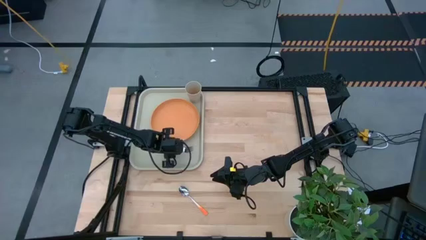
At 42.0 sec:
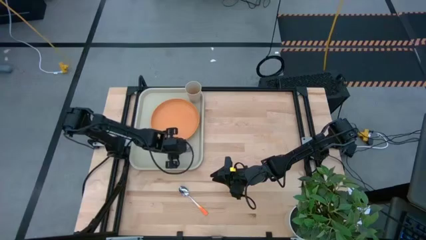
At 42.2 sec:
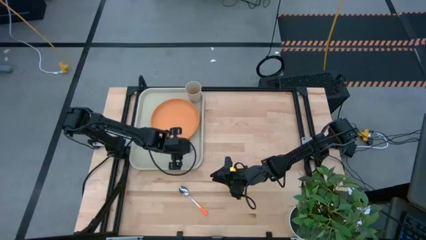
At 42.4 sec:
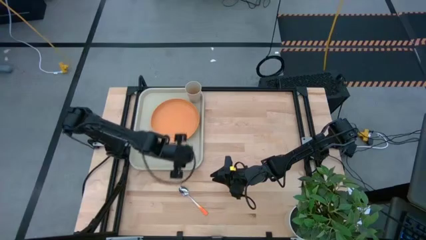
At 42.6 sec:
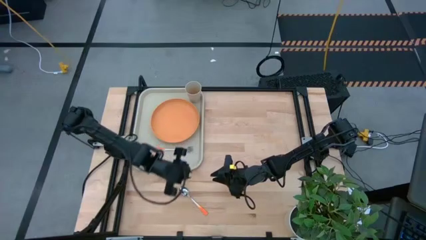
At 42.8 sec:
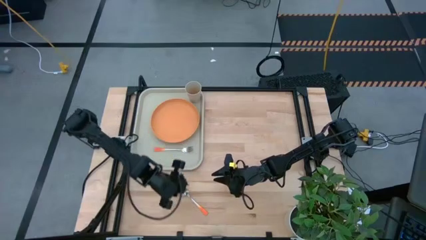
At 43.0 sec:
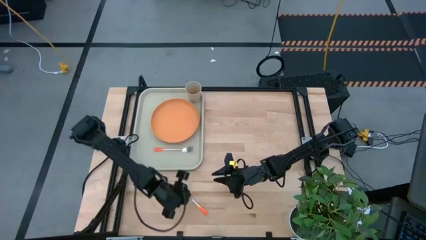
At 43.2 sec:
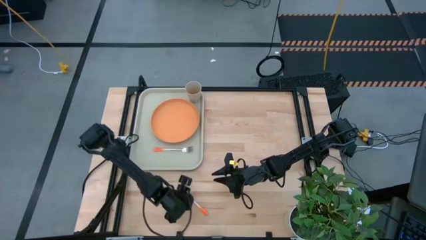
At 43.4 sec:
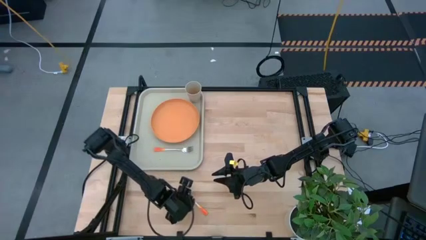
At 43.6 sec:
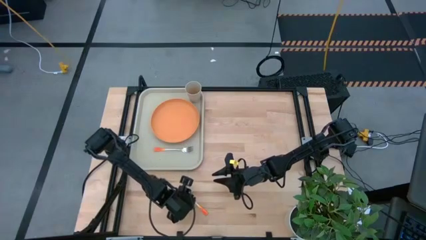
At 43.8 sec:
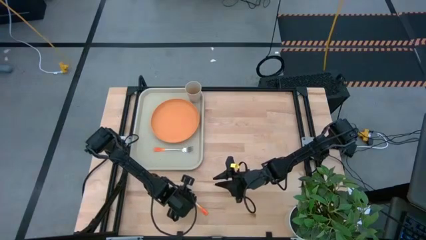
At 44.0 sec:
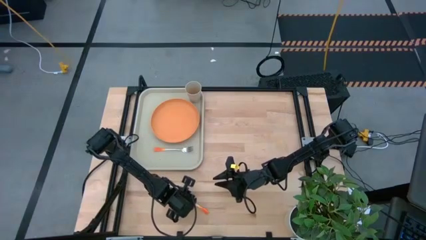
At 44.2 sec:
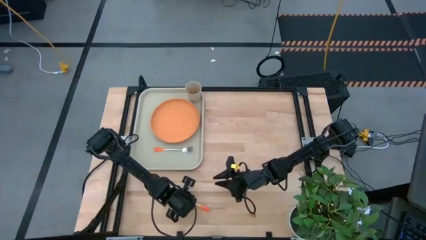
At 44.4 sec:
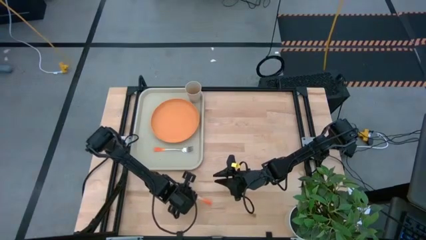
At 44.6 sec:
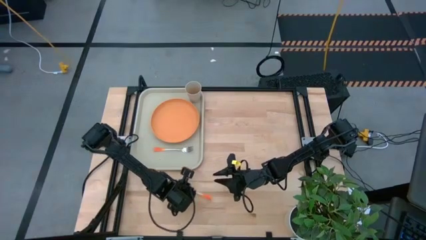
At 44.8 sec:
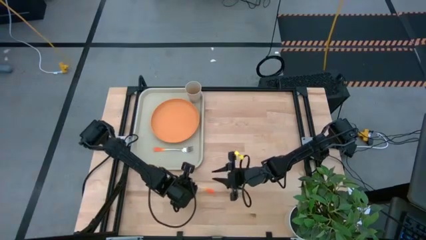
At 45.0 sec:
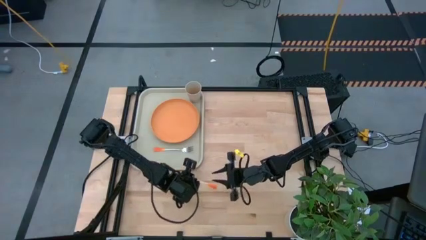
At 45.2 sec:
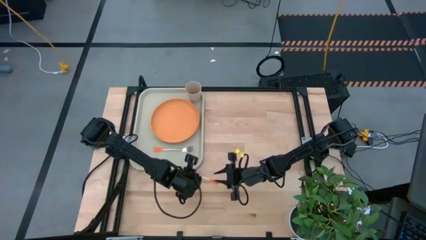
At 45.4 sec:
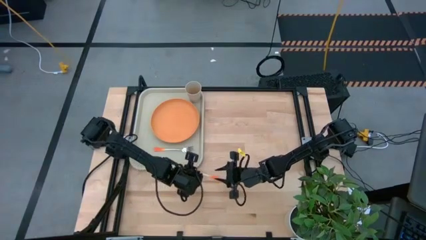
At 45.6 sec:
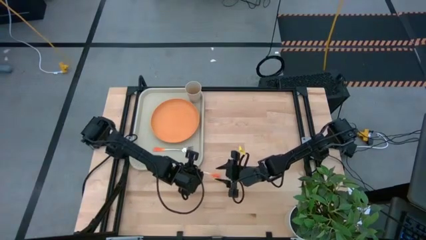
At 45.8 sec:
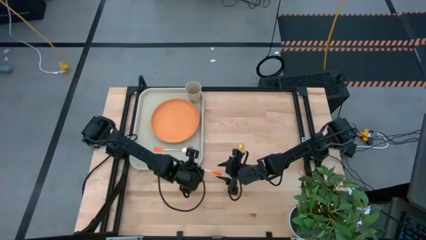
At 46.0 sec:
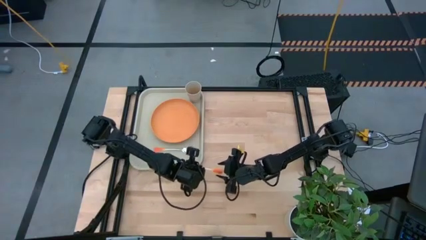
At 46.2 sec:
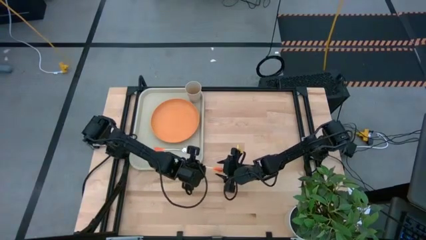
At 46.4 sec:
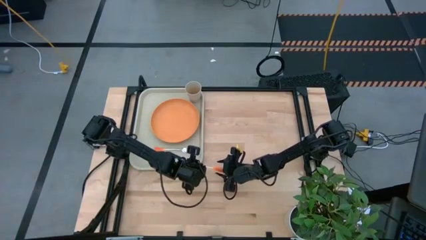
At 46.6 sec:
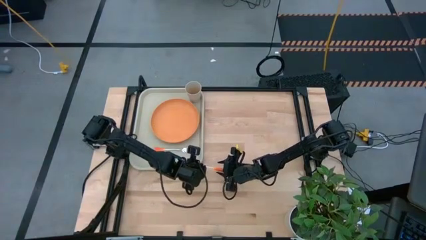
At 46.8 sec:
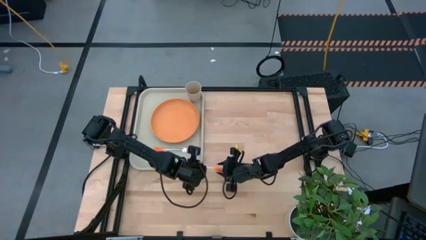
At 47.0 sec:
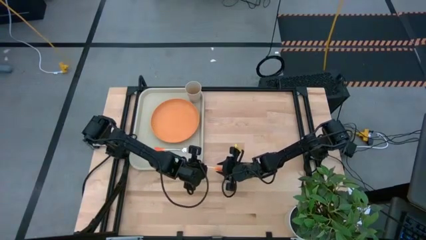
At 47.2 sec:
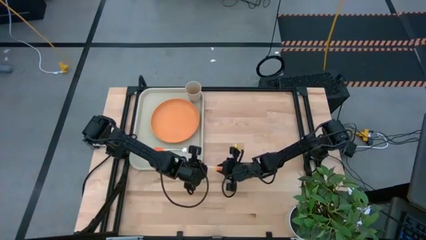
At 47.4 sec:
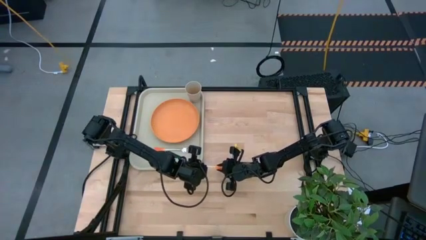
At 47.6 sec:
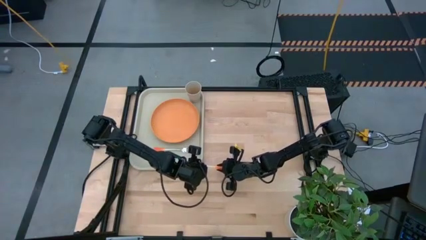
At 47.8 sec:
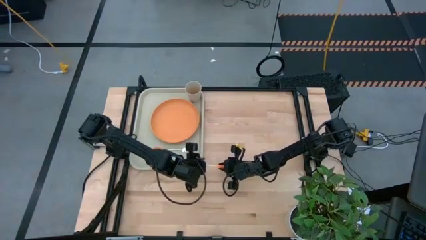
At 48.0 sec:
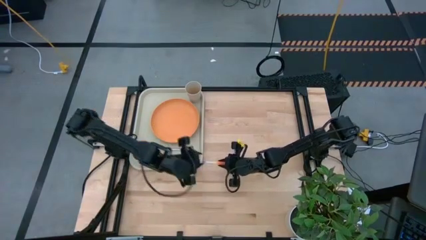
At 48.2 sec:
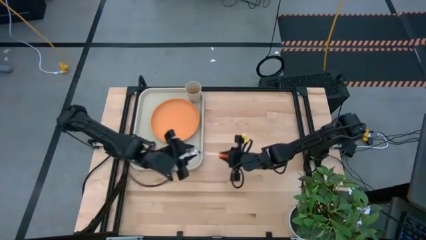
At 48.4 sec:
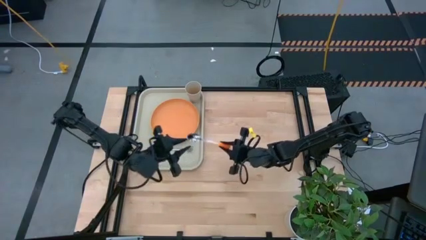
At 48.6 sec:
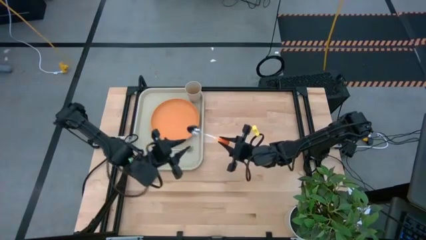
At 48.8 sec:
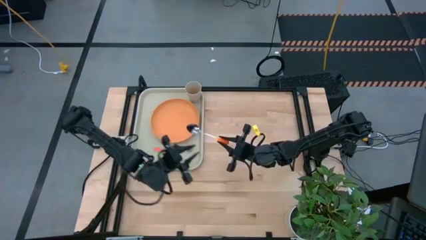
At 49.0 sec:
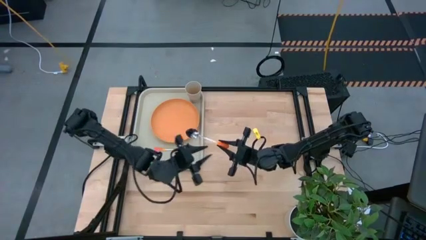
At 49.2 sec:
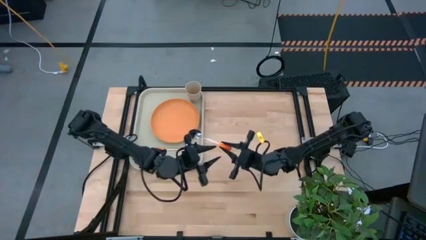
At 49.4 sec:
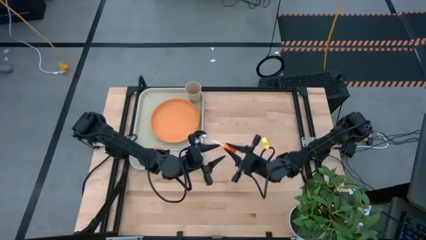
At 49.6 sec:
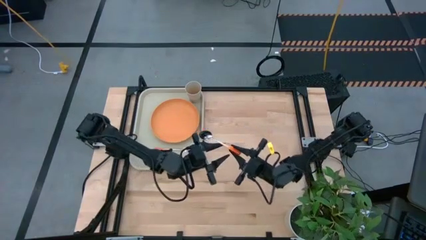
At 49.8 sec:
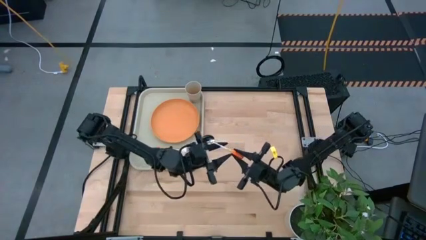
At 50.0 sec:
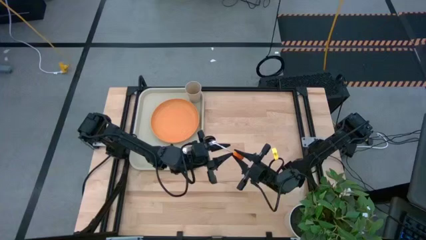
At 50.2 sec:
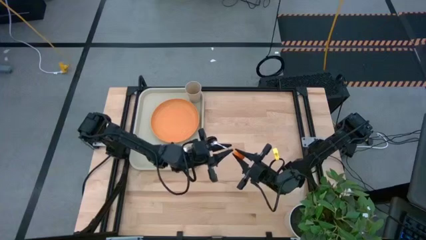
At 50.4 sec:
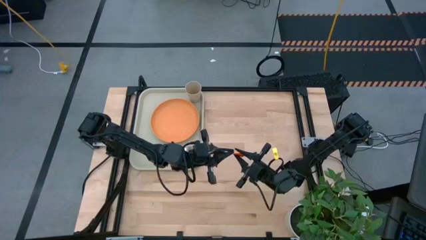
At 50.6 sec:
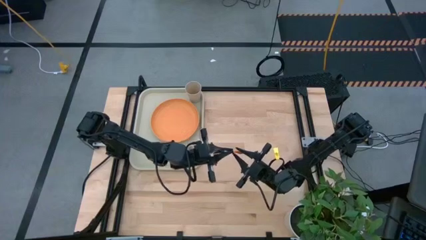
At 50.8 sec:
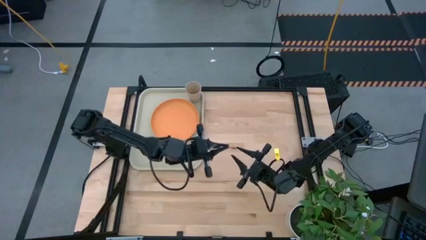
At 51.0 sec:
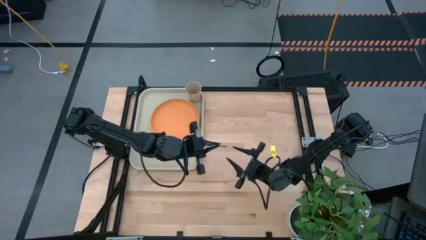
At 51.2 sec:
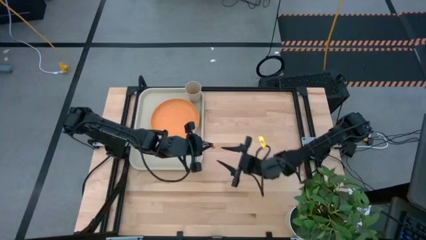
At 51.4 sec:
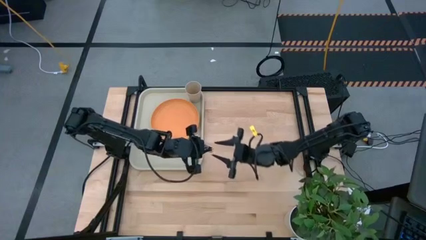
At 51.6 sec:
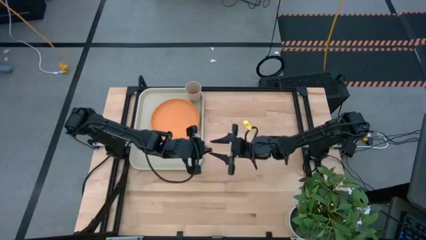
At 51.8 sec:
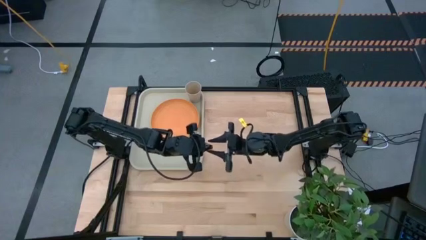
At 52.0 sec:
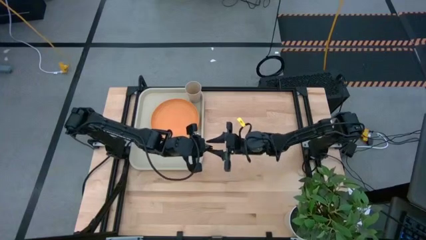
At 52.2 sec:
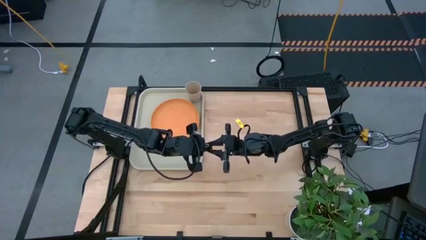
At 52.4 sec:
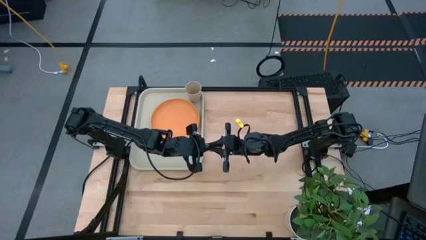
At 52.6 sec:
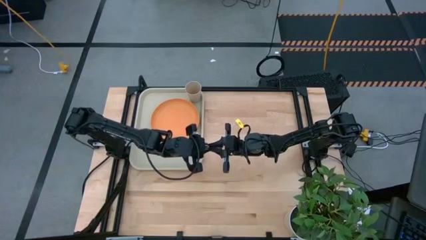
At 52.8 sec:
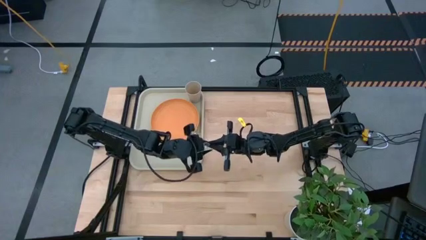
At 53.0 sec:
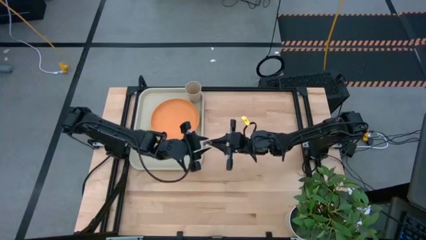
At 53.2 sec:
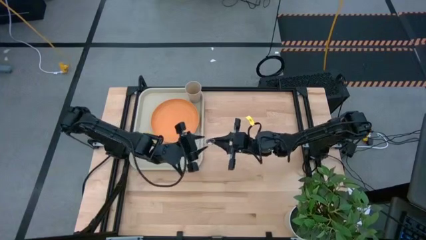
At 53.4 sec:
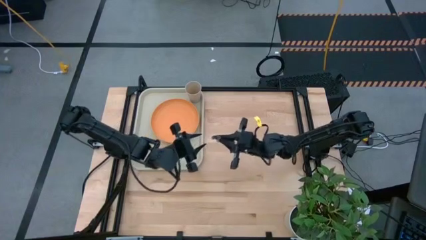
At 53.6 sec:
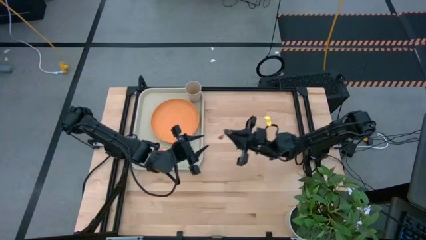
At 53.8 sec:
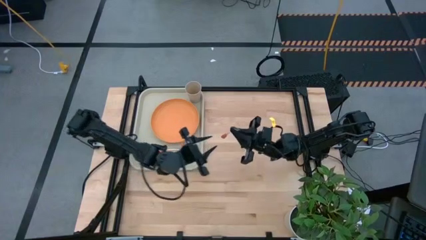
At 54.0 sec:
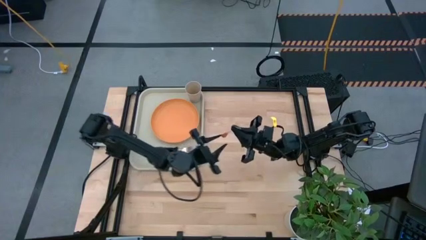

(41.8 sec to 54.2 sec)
Task: Pick and place plate/cup/fork/spoon on tray
Put the orange spoon on the light brown tray
